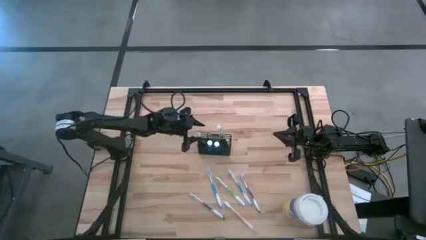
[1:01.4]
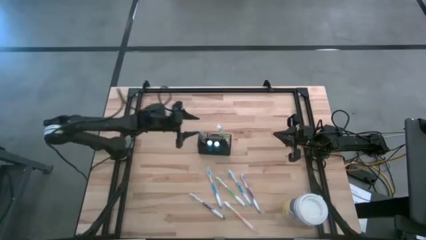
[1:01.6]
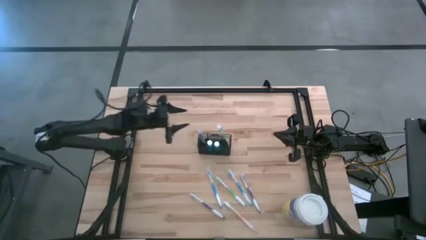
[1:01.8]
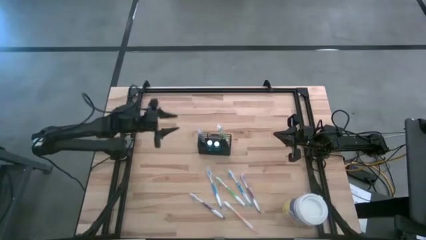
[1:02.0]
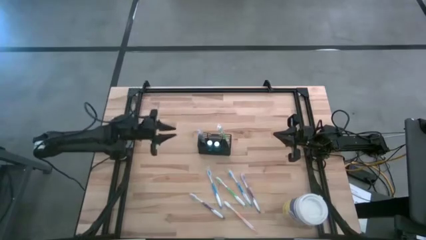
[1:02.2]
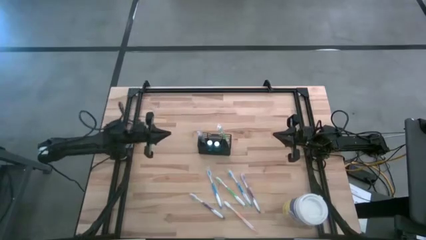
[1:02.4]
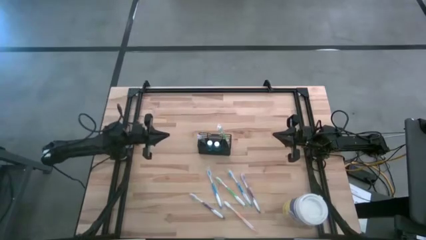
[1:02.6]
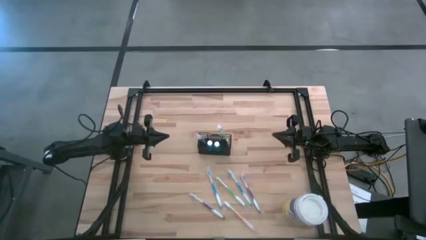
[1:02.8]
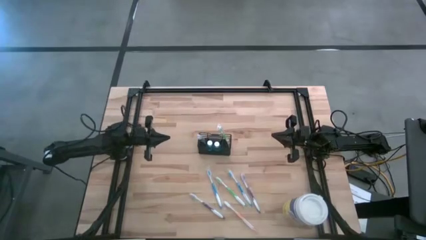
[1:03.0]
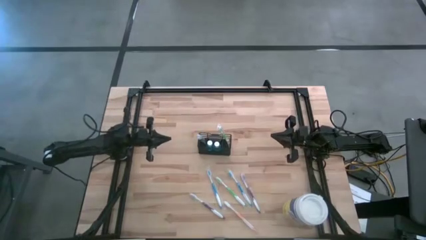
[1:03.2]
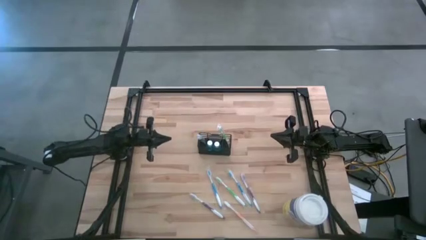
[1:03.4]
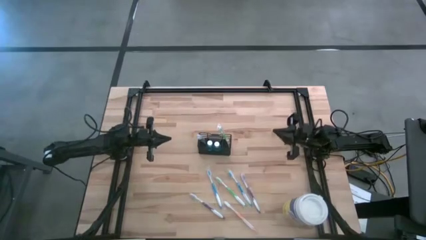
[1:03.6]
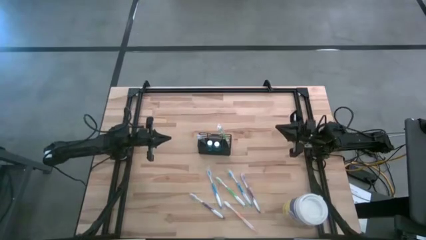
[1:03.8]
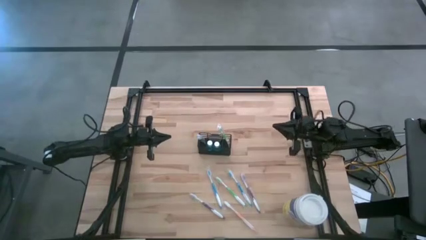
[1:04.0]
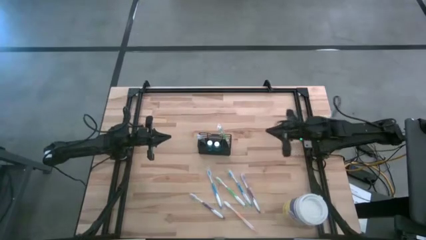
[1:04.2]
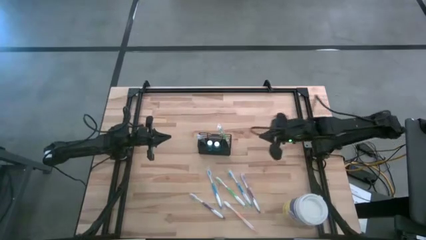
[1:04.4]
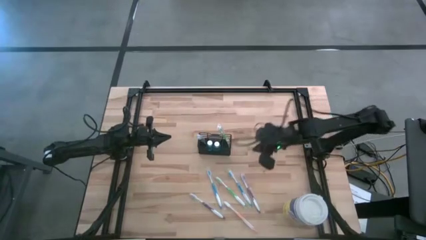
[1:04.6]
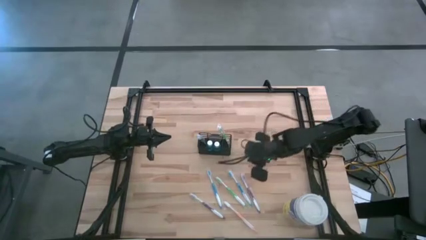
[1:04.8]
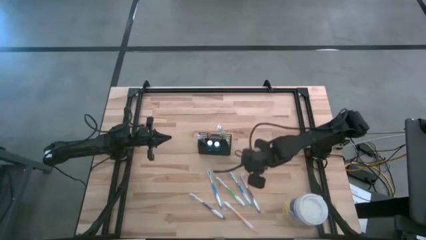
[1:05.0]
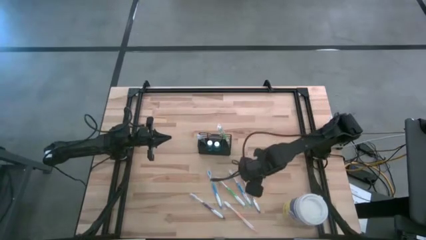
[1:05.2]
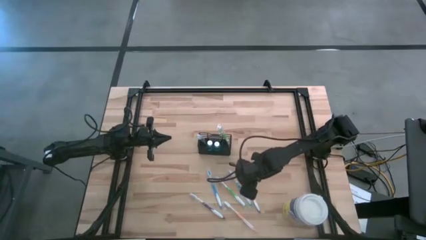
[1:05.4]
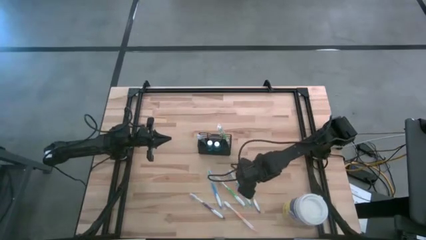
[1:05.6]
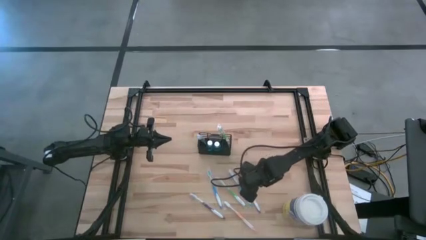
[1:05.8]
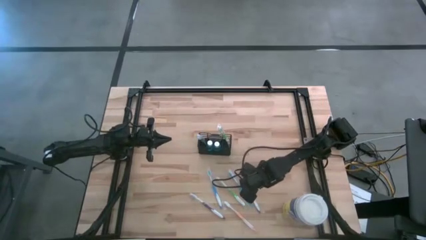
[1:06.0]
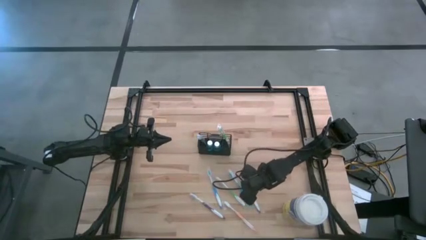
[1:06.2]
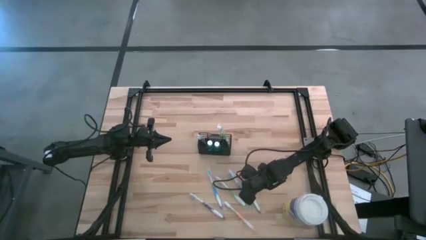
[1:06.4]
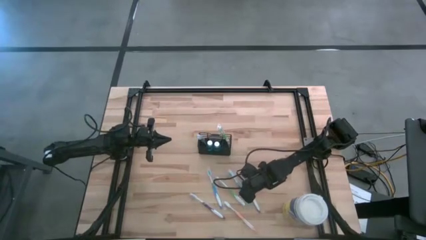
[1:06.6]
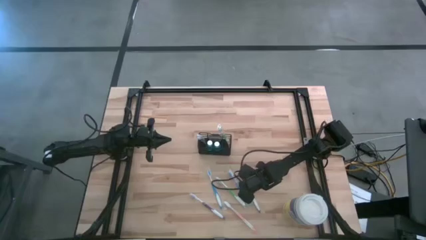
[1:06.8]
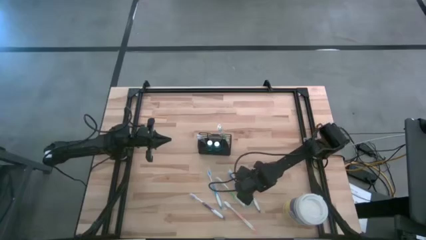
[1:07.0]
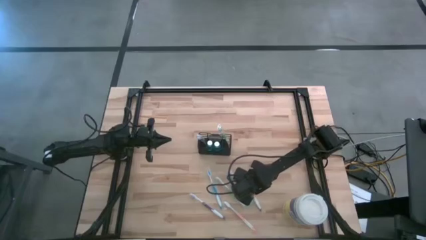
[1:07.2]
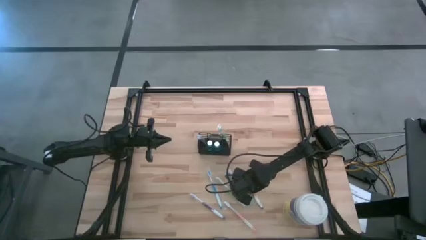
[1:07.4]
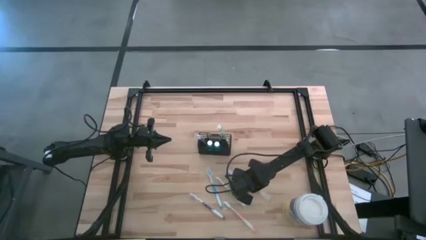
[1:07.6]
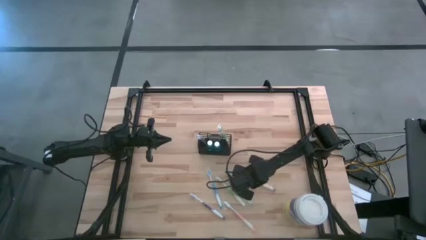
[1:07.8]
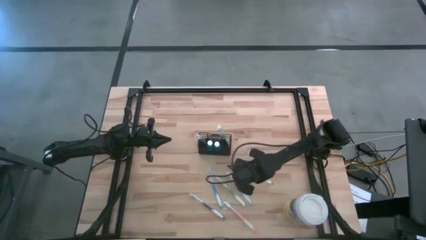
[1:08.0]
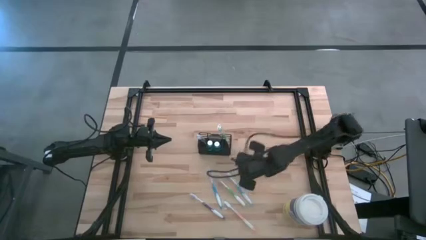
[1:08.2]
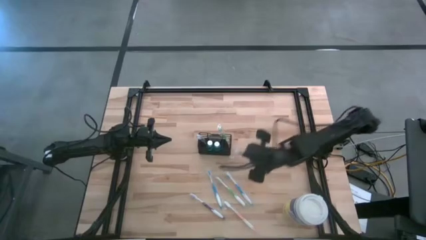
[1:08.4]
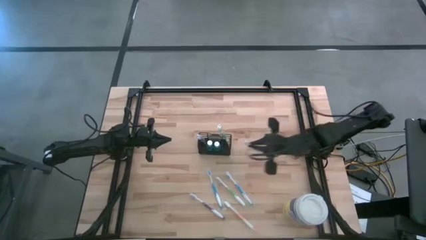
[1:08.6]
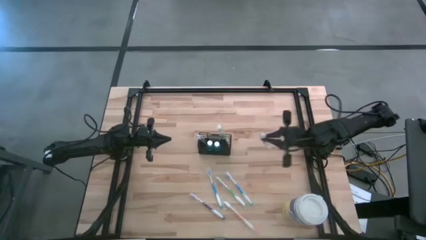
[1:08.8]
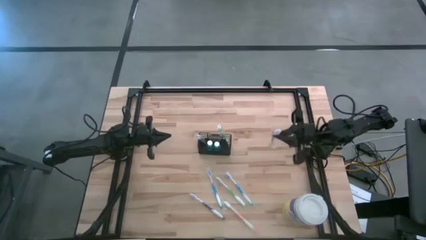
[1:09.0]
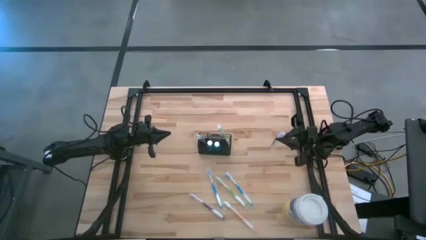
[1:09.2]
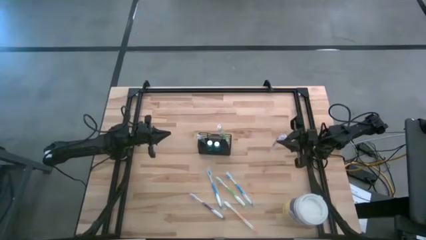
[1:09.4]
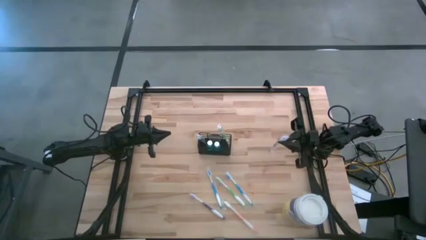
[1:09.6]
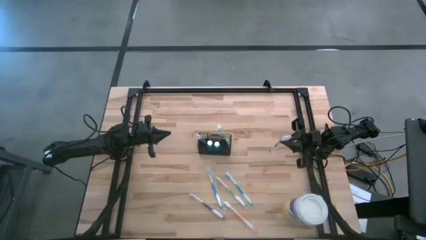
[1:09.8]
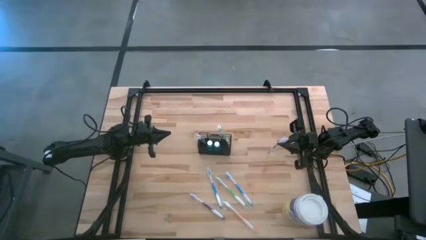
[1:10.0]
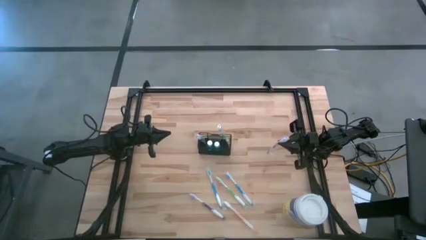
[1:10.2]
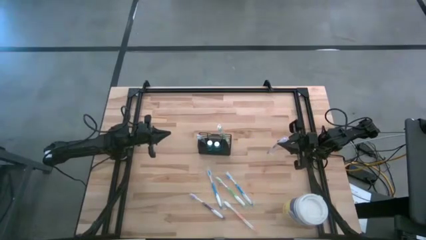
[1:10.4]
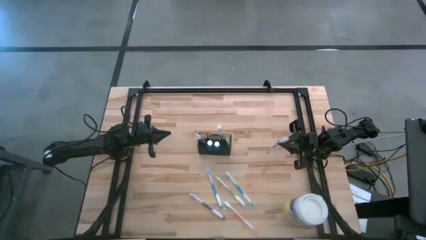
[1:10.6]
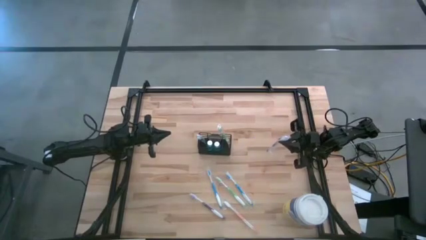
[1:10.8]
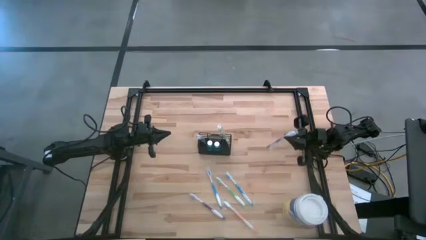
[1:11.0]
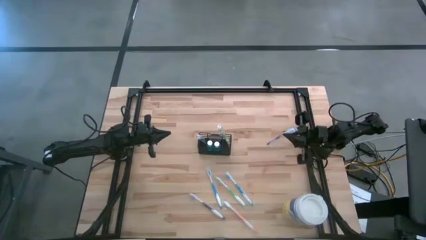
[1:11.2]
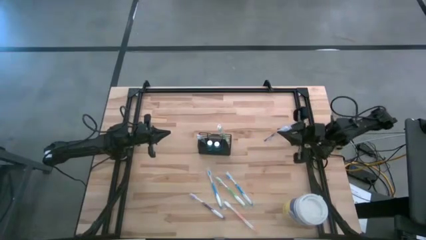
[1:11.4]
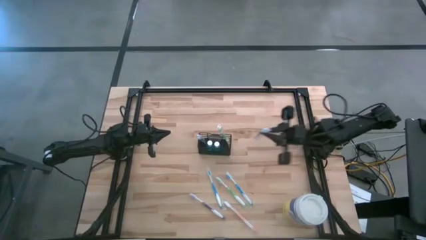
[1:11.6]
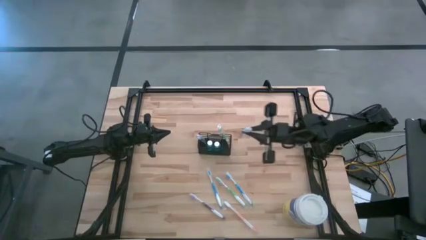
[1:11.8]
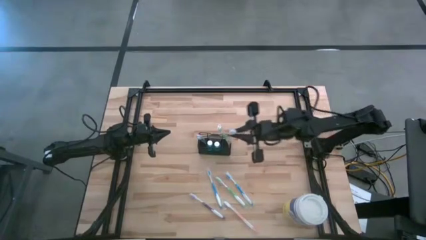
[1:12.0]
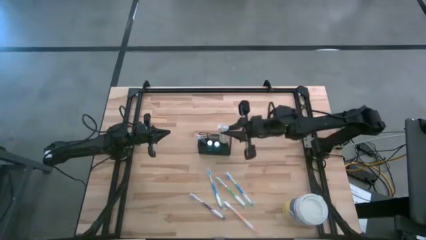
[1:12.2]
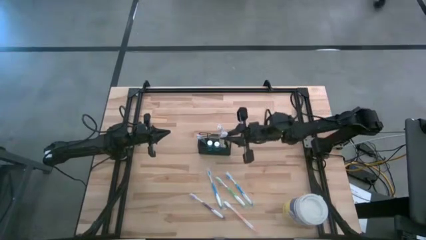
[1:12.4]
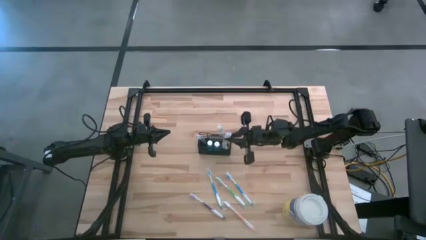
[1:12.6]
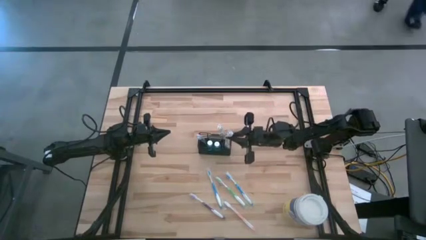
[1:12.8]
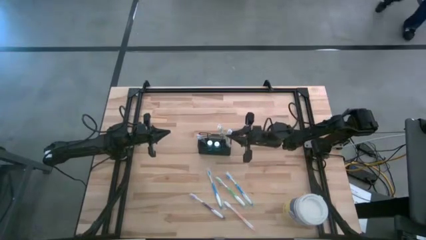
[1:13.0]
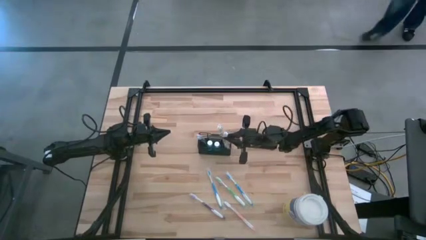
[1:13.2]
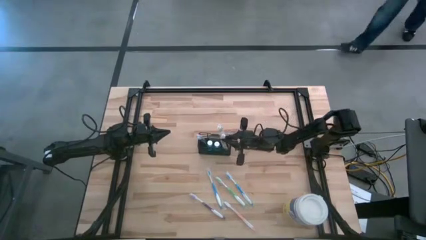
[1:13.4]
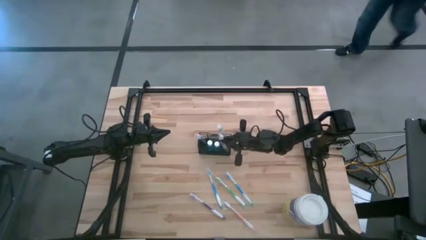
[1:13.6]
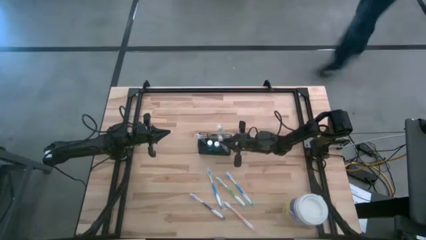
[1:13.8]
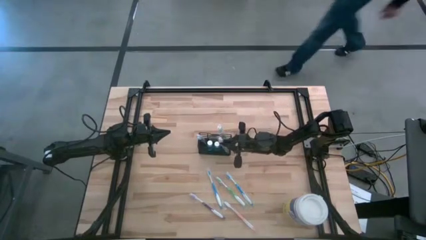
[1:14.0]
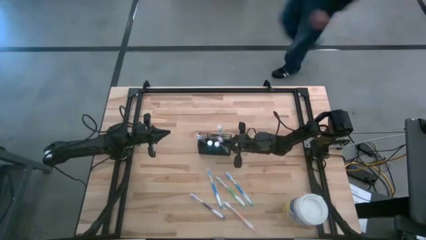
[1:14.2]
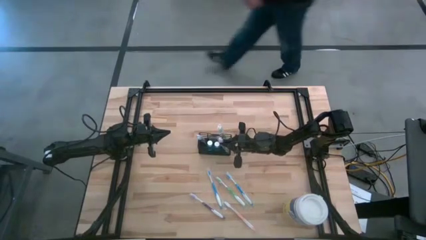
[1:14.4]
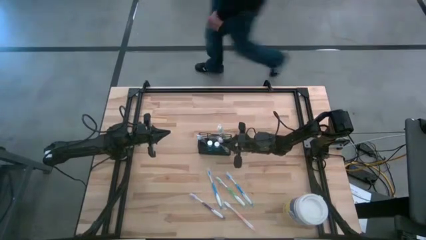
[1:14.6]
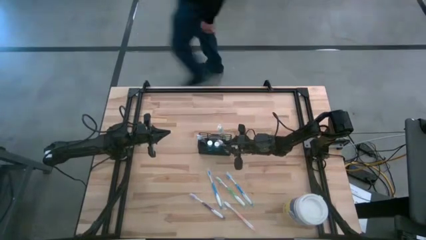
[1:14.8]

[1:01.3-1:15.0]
Task: Pick & Place toothbrushing station
Put the right violet toothbrush into the black wire organizer
